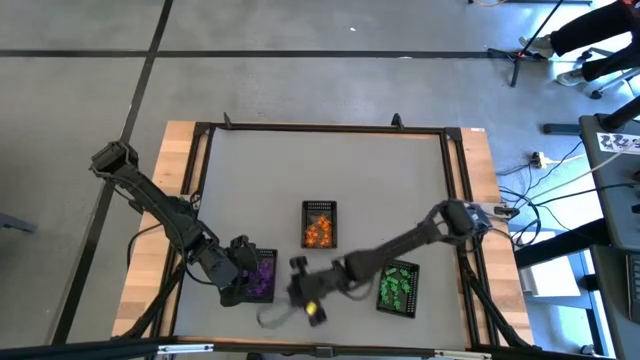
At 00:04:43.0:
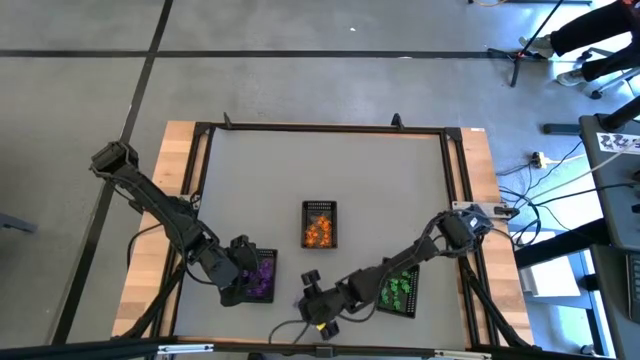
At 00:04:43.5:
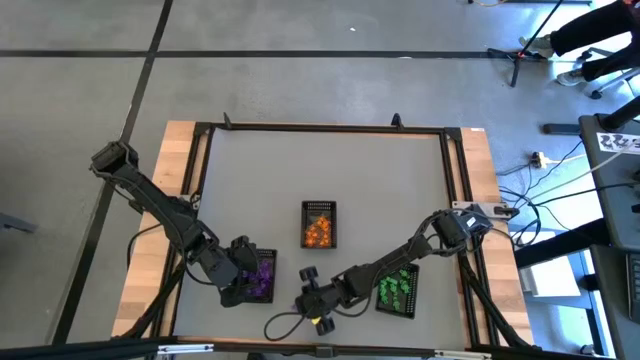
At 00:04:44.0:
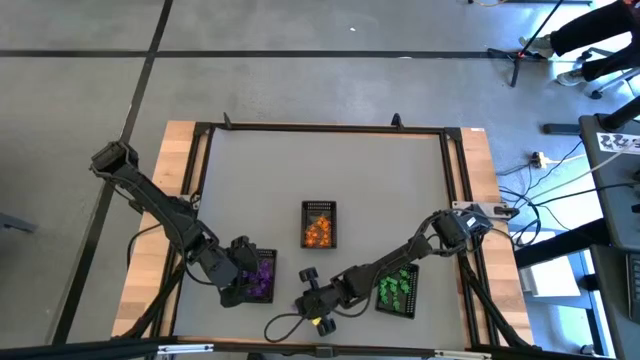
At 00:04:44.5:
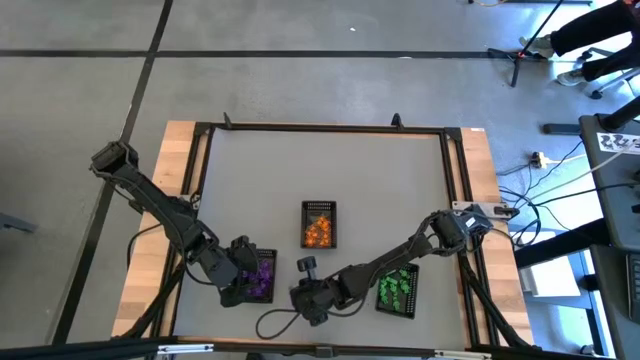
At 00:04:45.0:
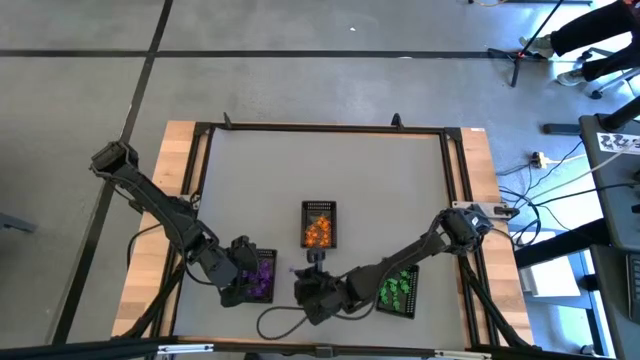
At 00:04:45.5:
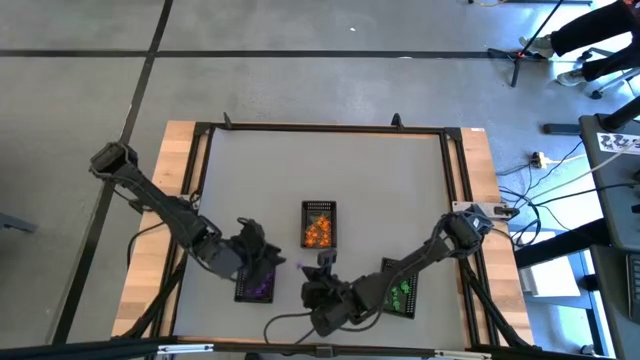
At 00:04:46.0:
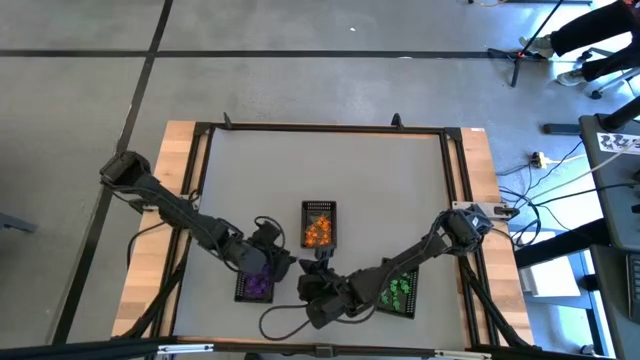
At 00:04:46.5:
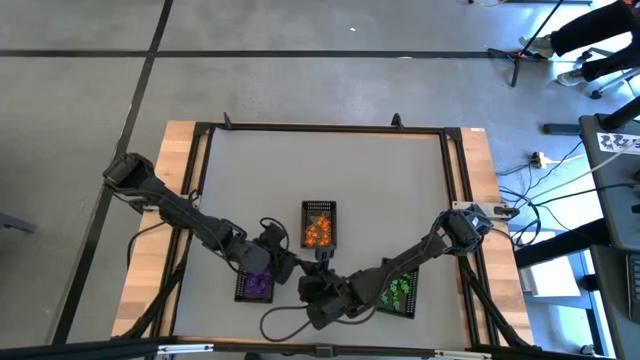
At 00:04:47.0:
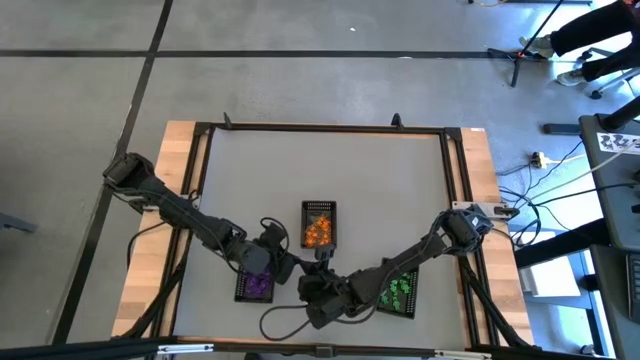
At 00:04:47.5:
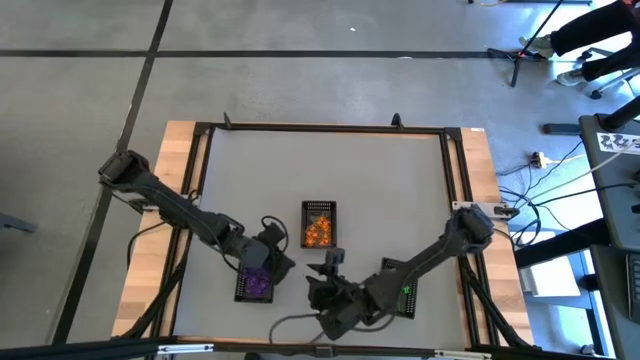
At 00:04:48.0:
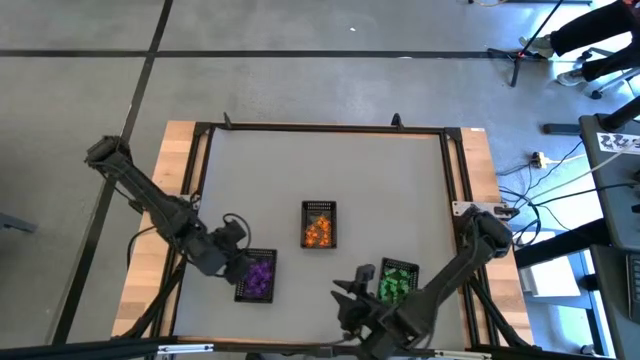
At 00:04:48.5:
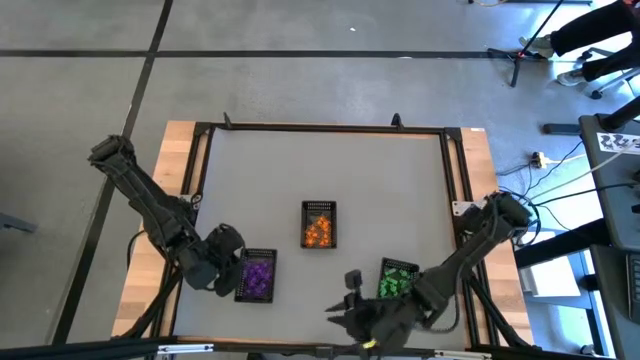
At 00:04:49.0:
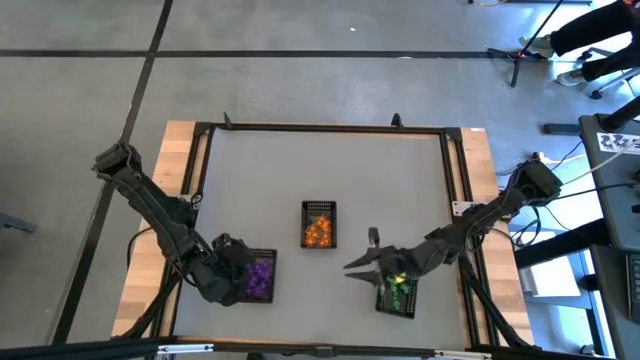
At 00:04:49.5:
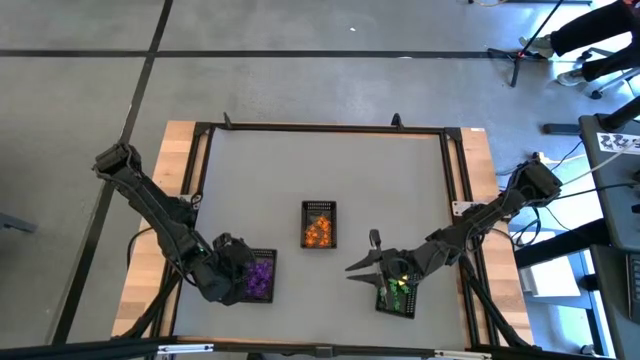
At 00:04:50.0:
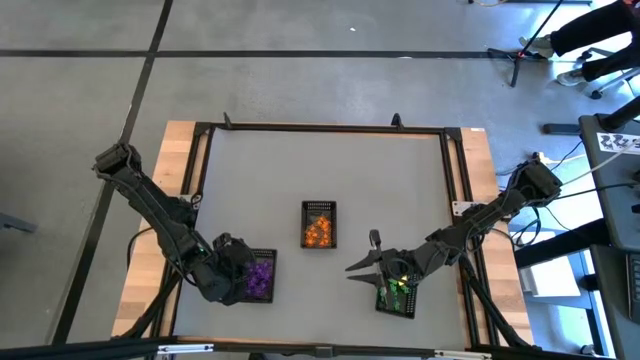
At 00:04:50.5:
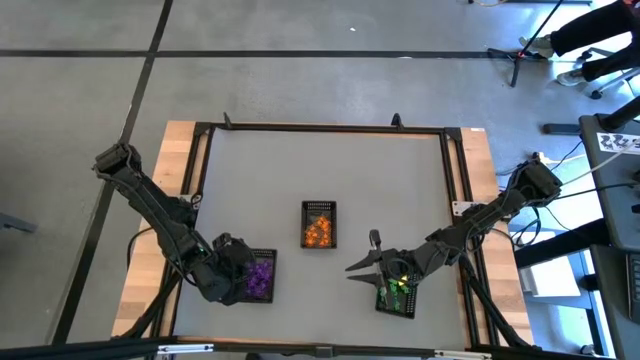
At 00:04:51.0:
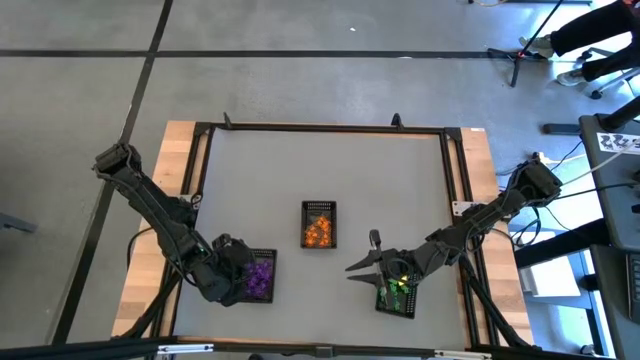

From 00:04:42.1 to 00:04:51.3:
Task: Sort Halloween decoration
Put the violet spider toy into the bottom left black bin

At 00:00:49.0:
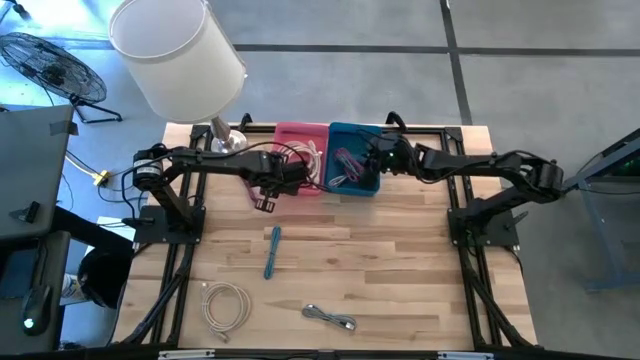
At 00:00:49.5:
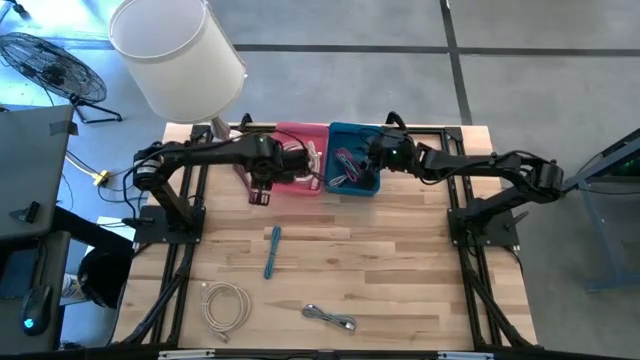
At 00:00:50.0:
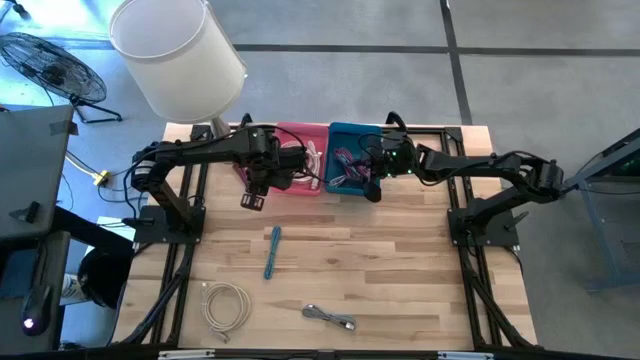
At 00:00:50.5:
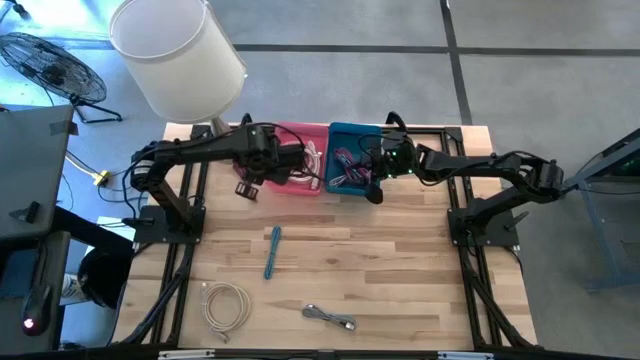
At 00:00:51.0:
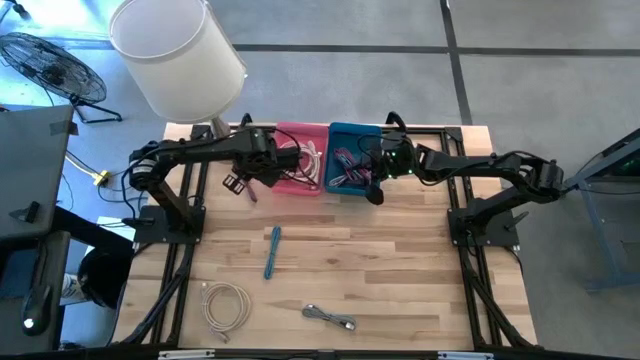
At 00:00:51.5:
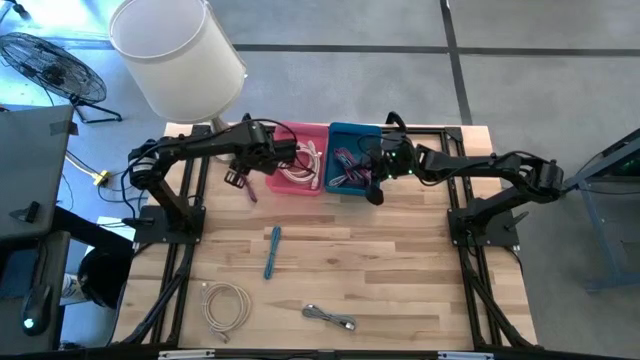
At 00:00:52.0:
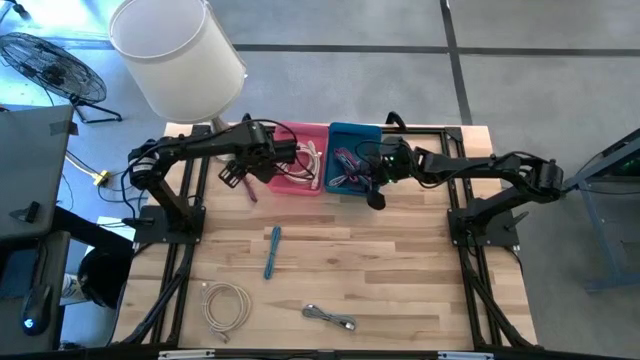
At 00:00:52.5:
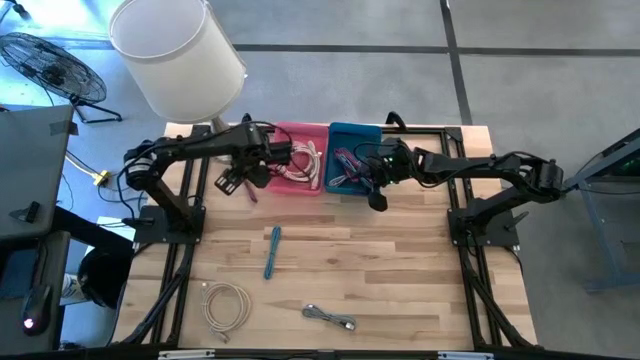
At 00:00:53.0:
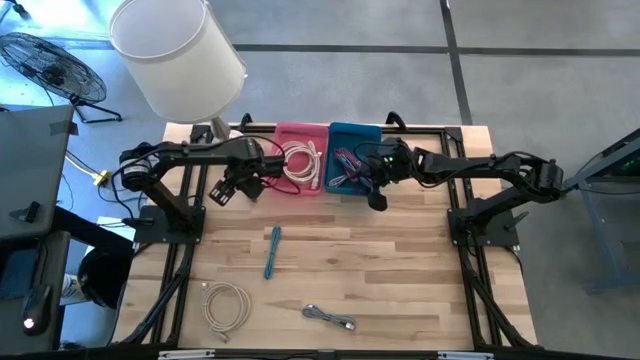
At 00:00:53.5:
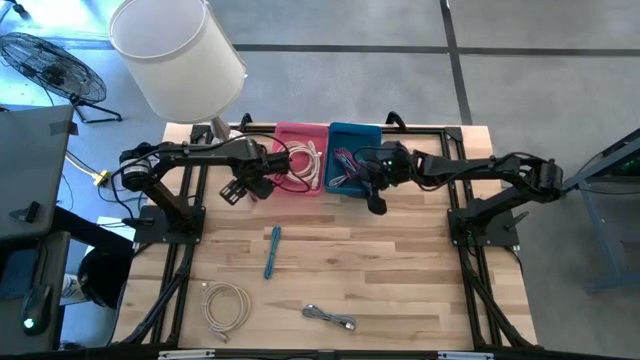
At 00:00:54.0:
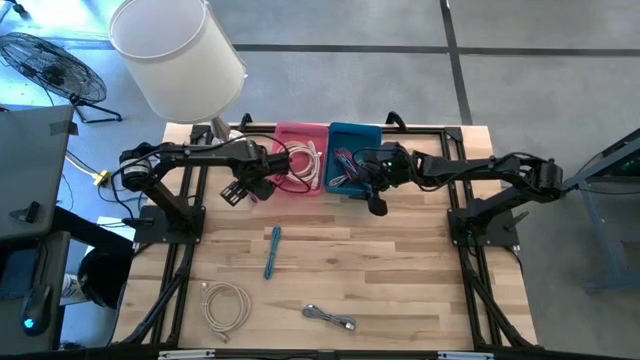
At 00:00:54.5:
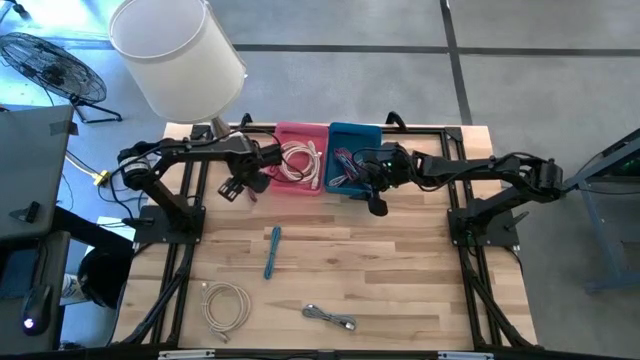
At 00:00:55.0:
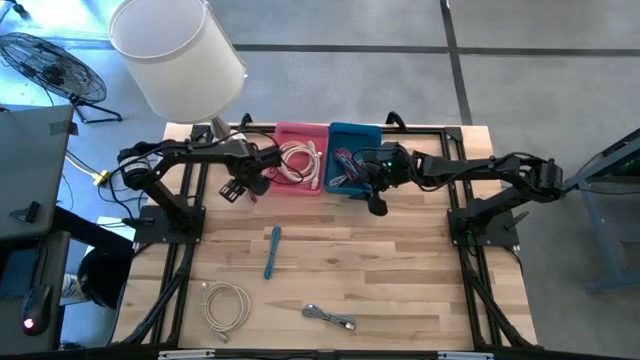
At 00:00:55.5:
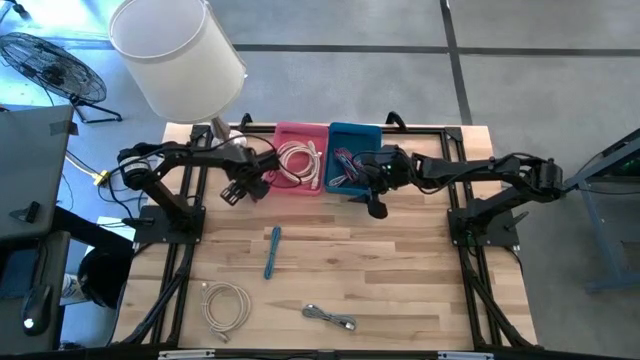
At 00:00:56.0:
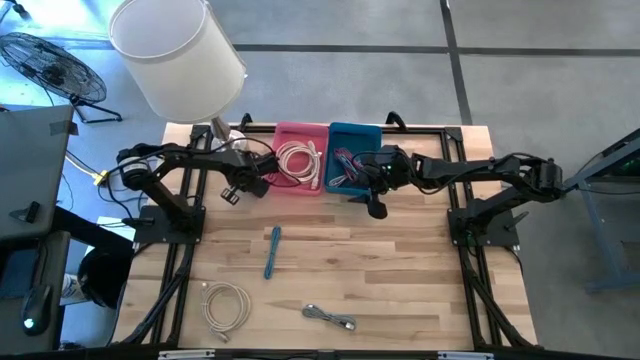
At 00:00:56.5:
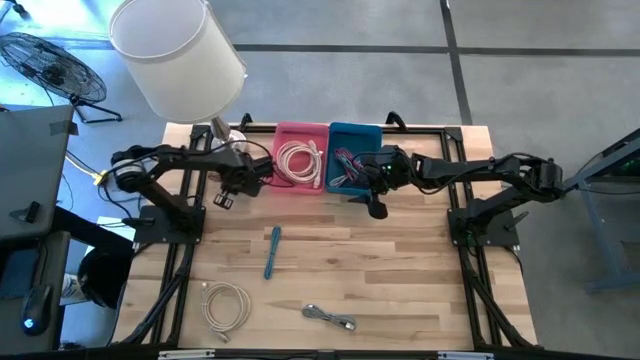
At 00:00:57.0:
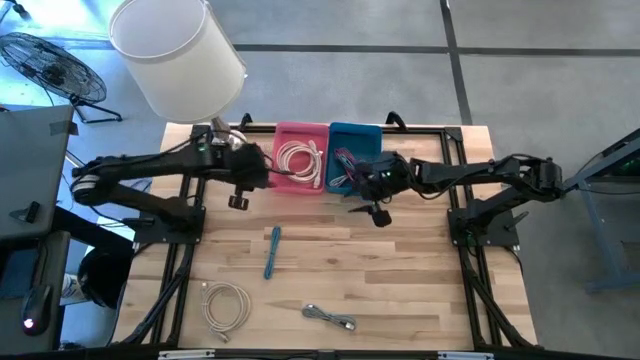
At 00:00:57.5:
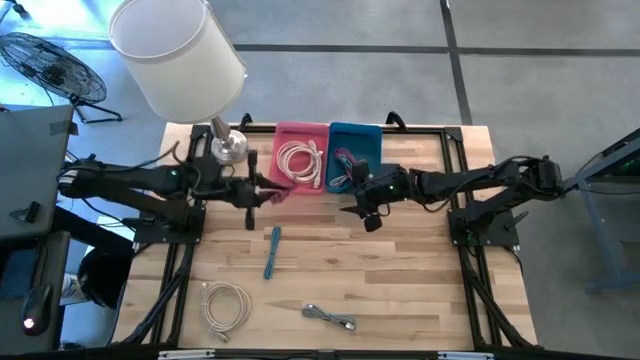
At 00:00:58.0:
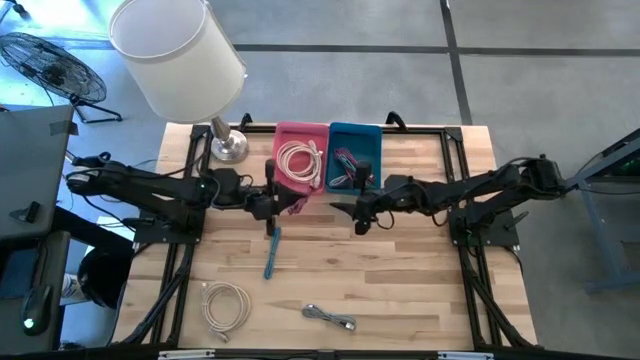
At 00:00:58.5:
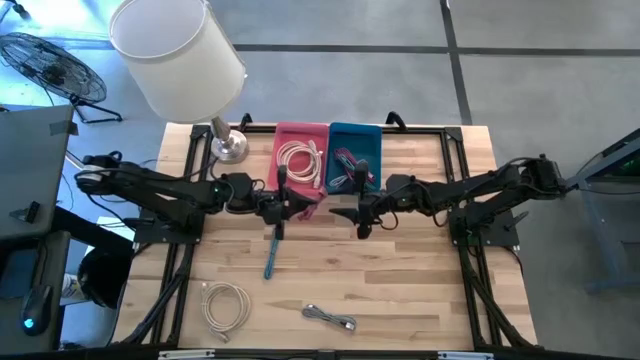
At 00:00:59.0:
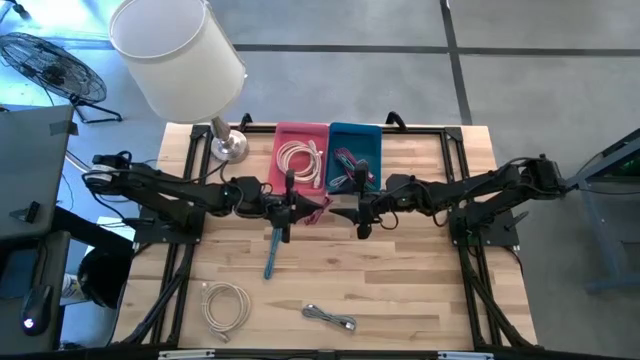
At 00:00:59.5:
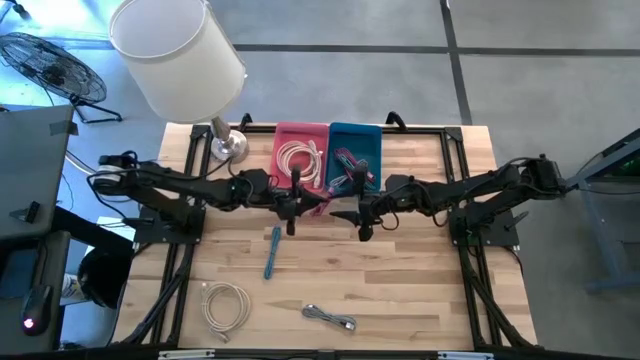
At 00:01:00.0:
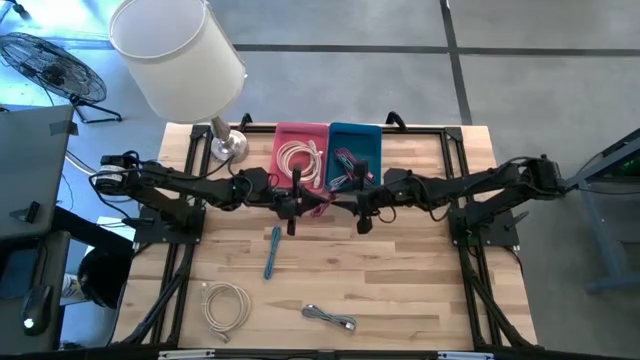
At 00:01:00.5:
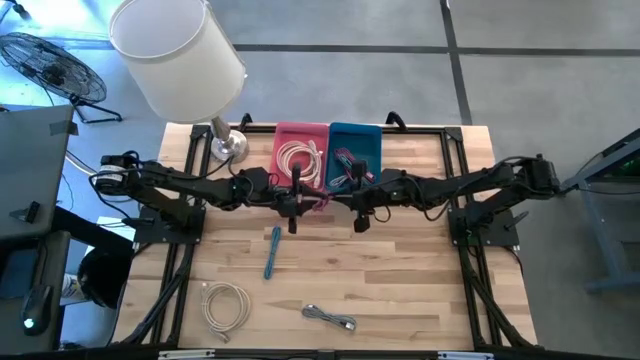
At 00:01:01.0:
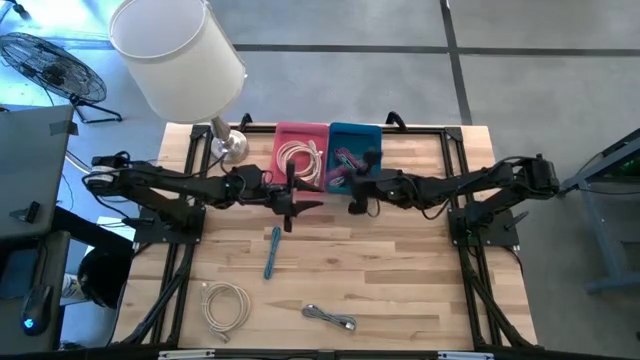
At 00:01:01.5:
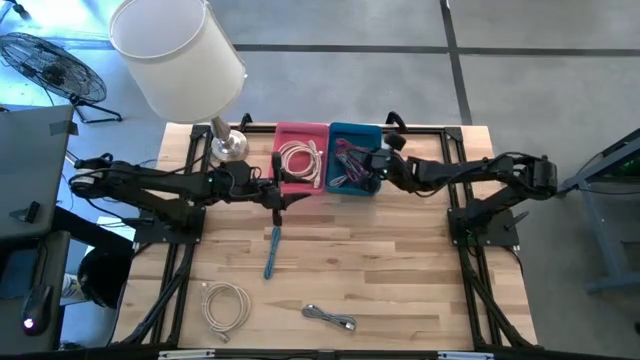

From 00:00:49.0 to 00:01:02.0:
Task: Pick & Place USB Port
Put the pink charger cable into the blue bin
